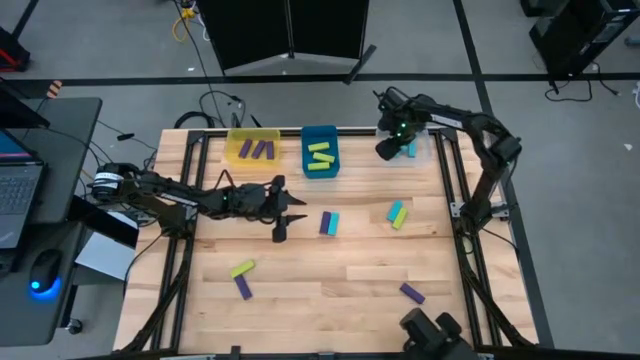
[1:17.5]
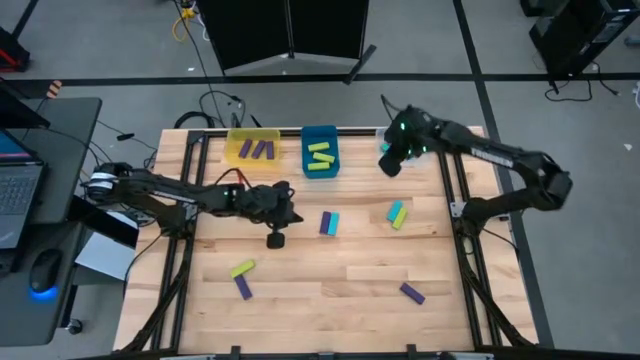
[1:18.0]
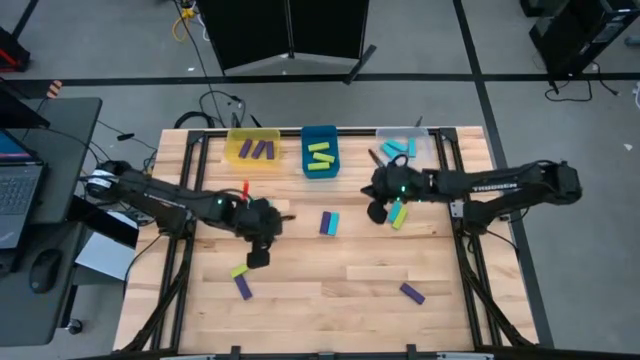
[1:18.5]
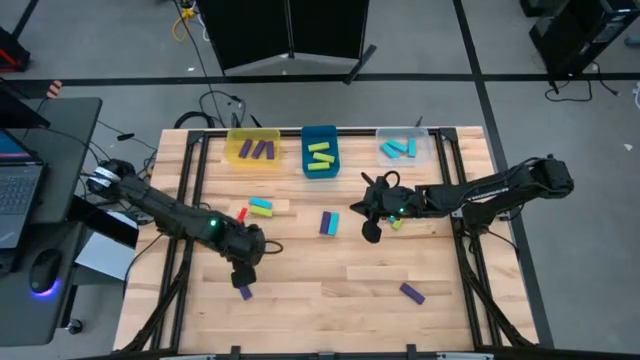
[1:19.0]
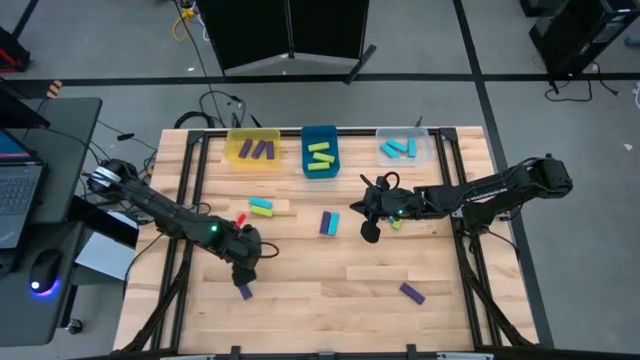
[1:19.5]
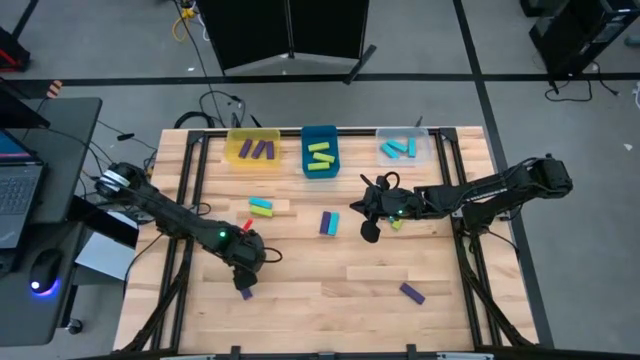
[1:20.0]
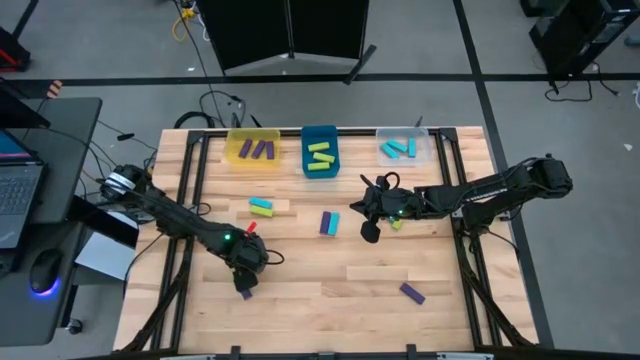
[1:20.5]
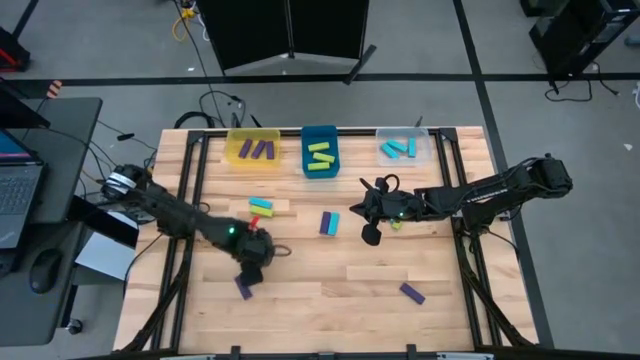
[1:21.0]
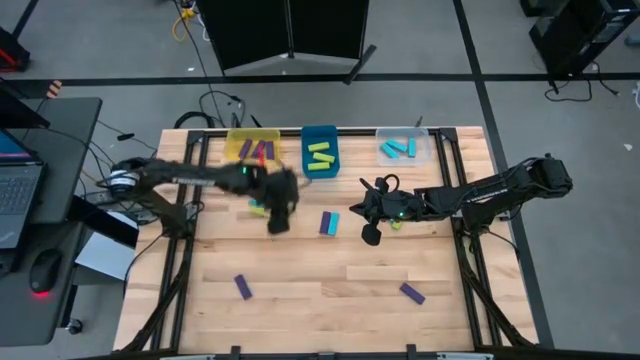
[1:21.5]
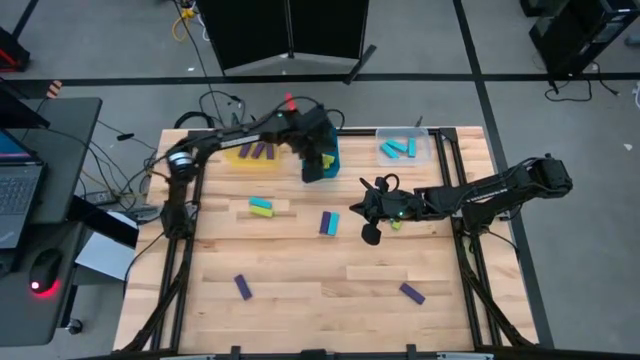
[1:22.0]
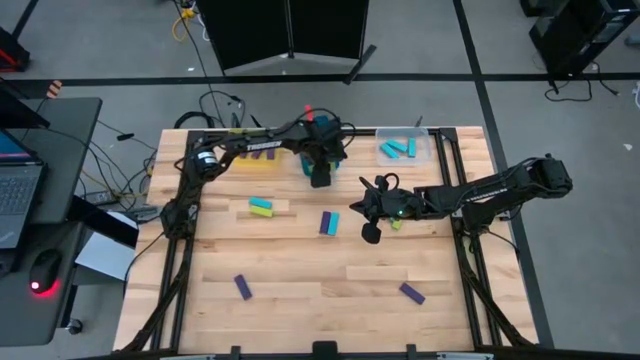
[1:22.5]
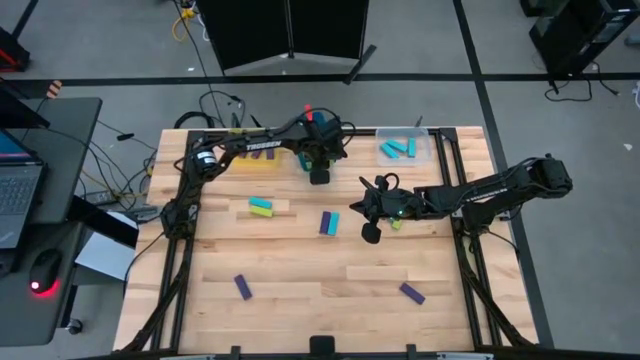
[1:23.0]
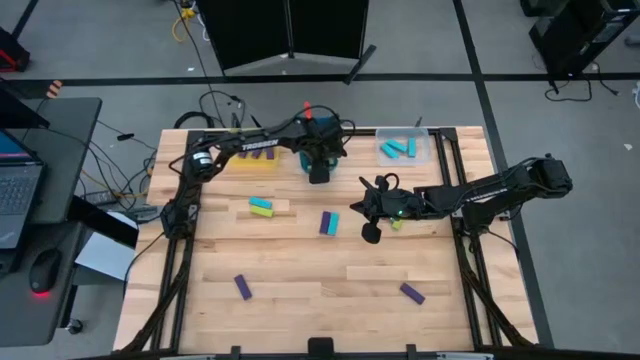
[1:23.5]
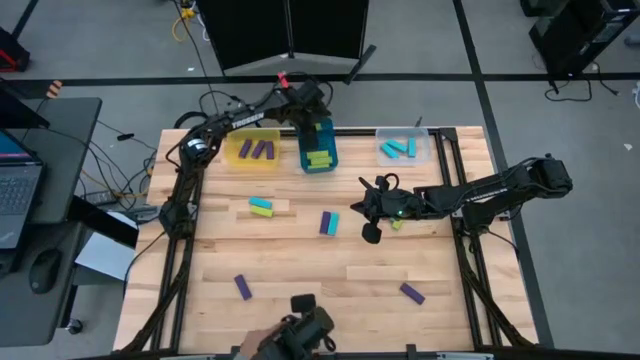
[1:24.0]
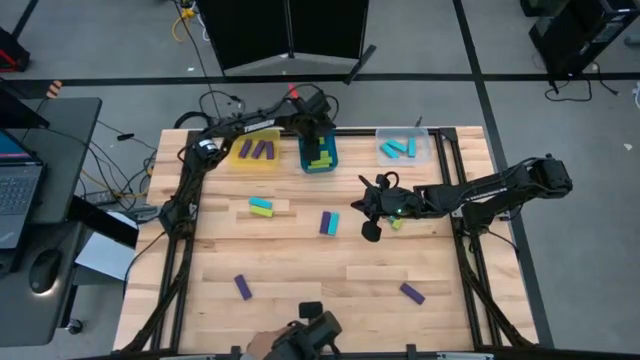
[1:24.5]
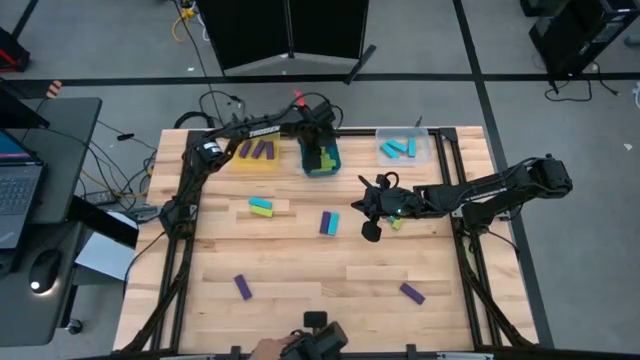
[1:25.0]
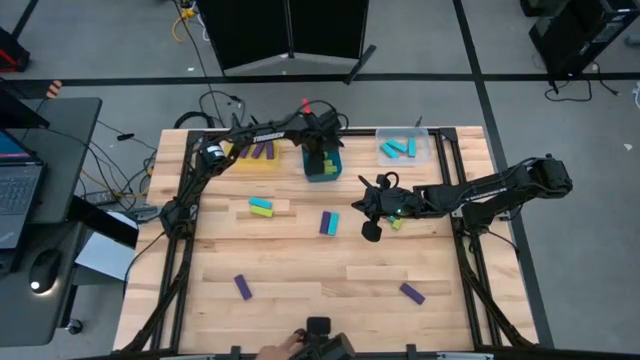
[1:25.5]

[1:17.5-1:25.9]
Task: Sort blocks
Put the green block into the blue bin

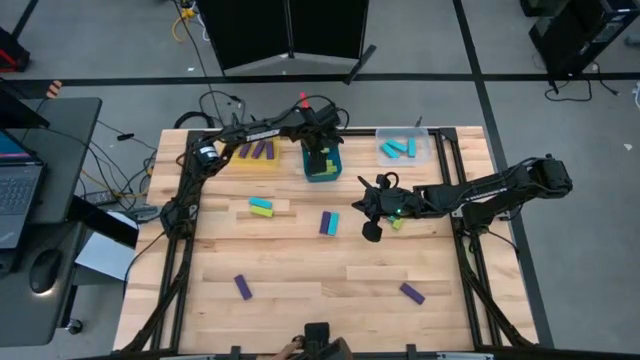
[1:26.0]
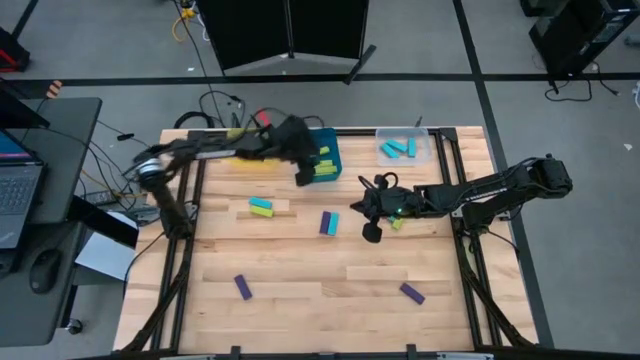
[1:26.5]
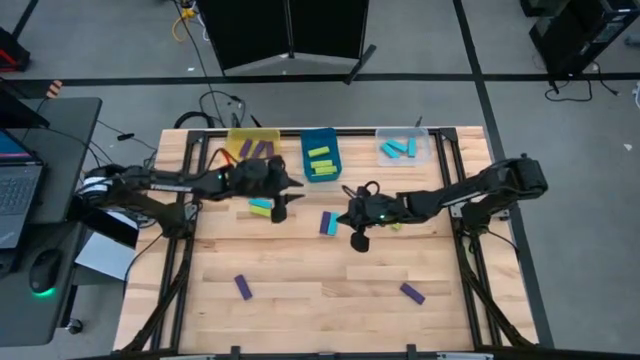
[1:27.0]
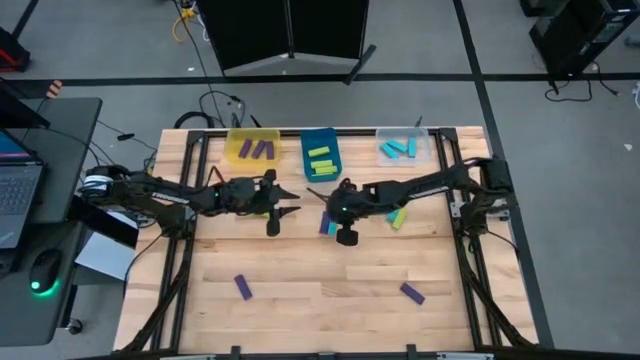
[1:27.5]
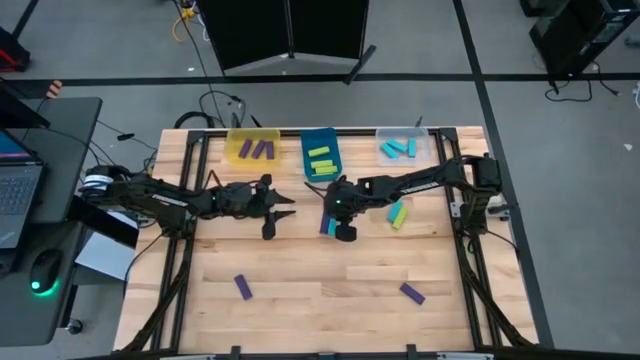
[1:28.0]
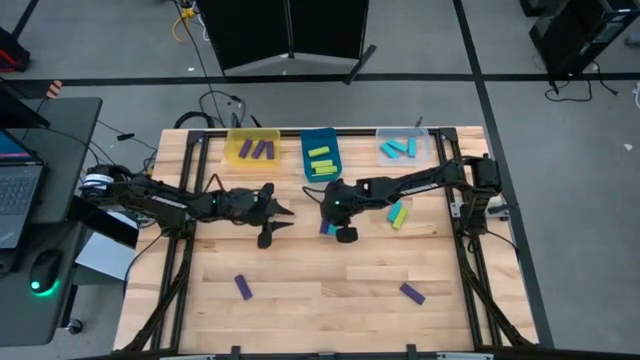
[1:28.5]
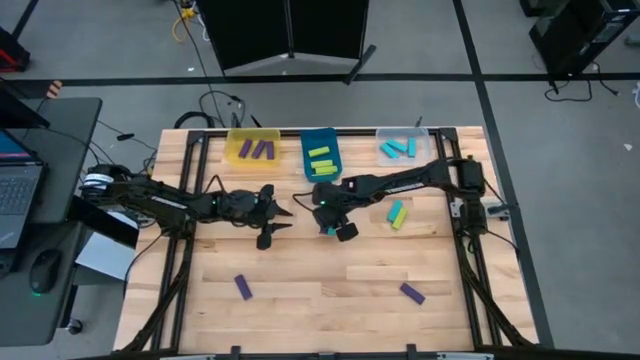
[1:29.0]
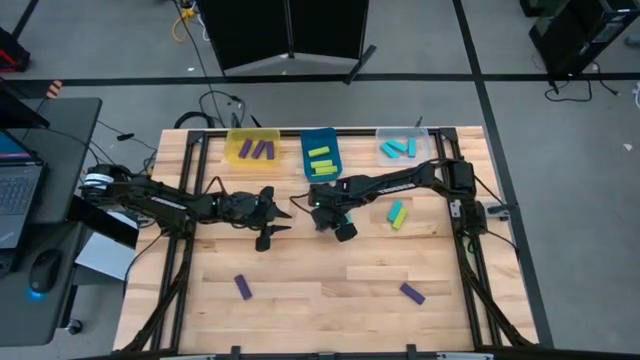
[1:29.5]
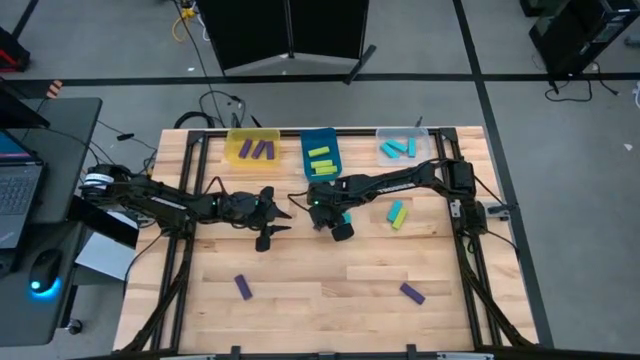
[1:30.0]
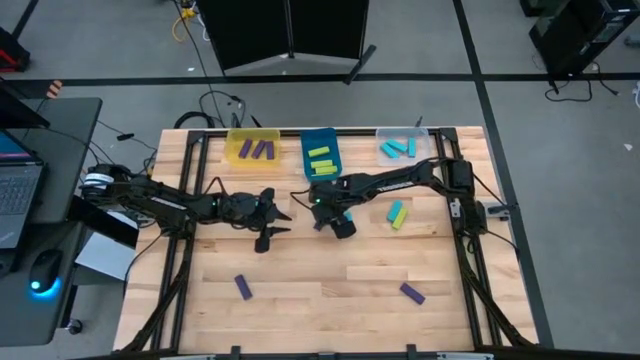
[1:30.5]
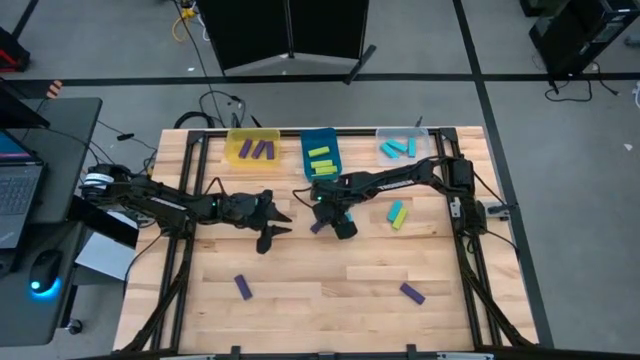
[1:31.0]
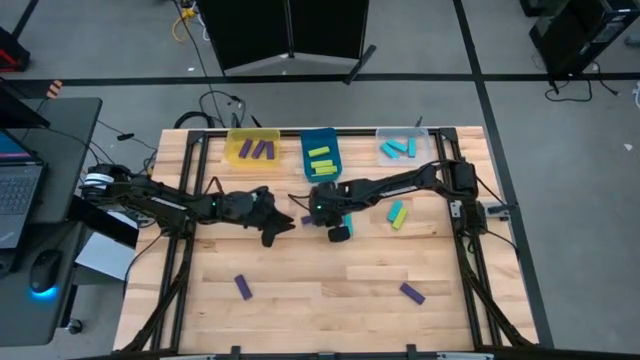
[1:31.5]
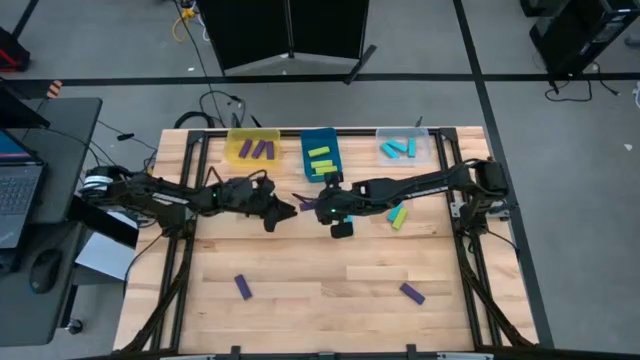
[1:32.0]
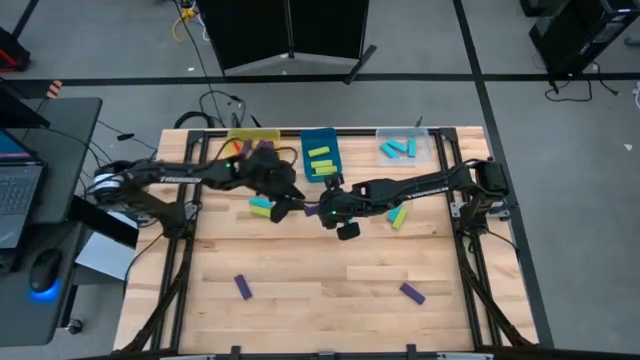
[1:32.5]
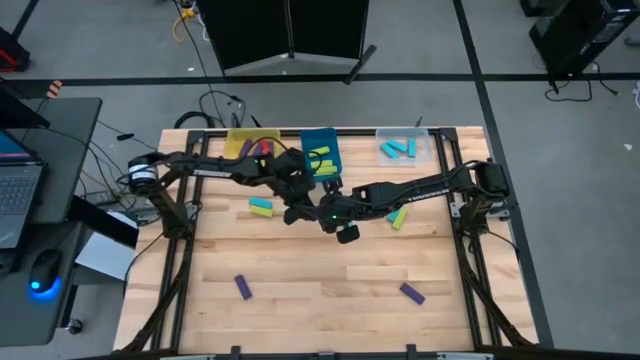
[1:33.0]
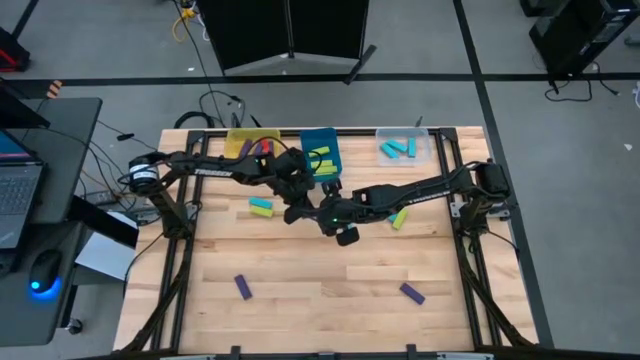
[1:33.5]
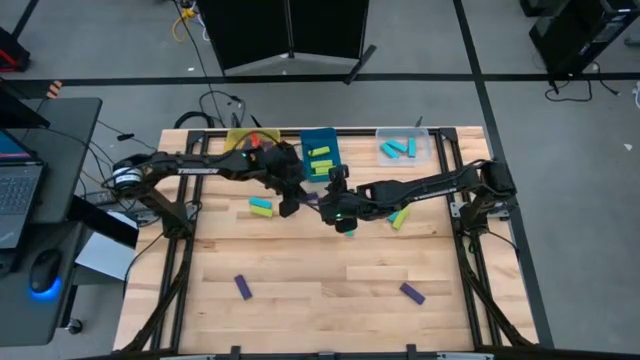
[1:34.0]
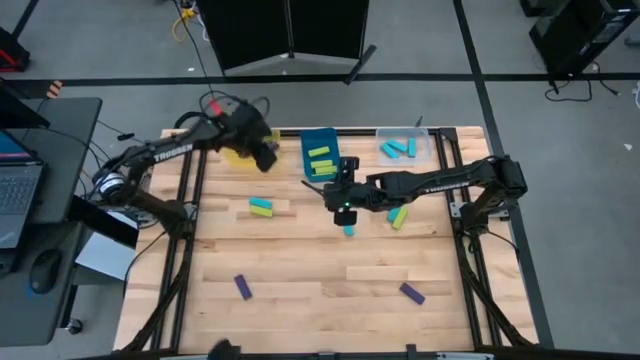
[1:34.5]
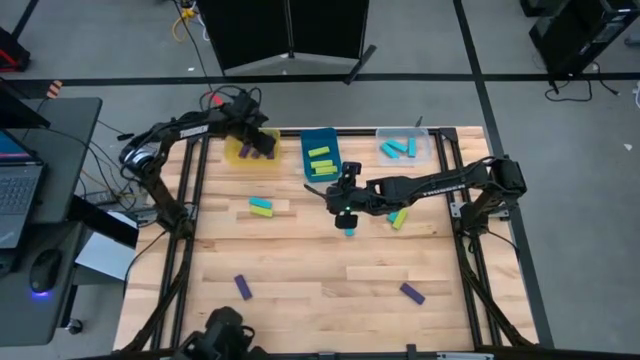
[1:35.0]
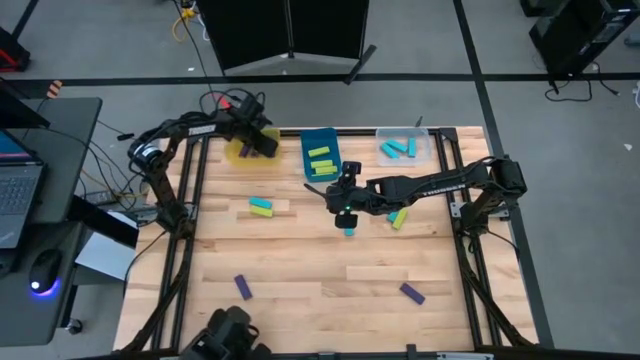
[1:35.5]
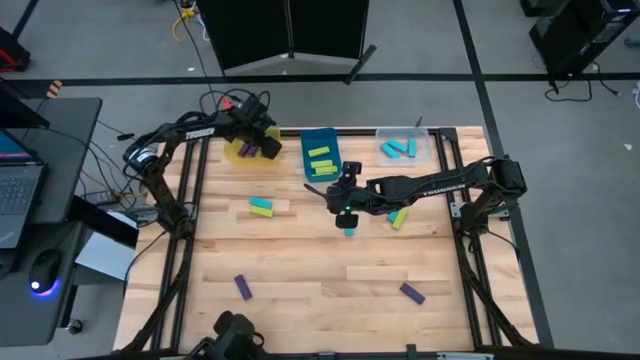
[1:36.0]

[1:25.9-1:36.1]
Put the violet block into the yellow bin
